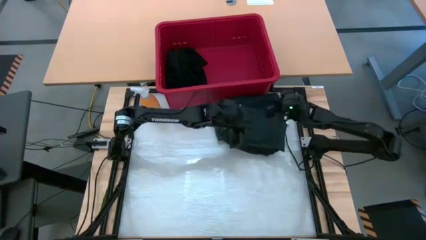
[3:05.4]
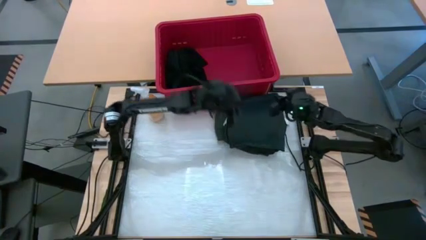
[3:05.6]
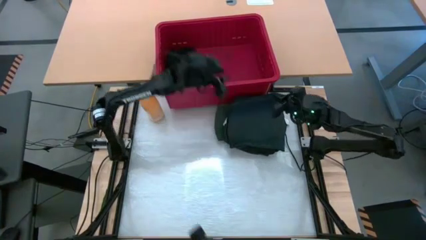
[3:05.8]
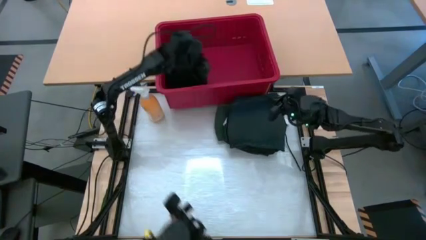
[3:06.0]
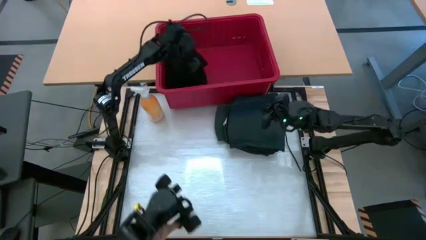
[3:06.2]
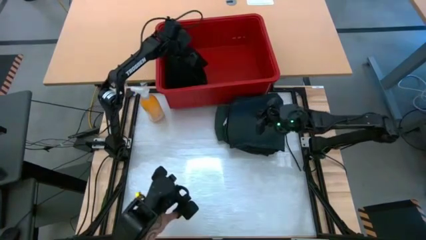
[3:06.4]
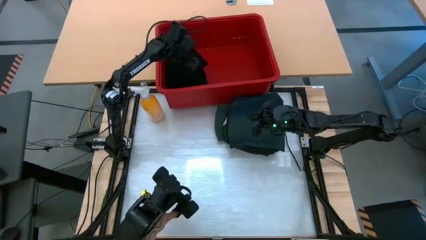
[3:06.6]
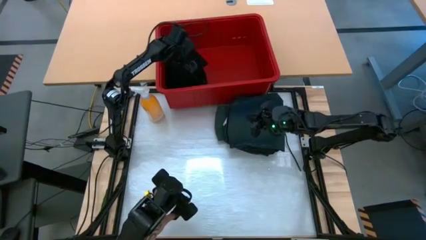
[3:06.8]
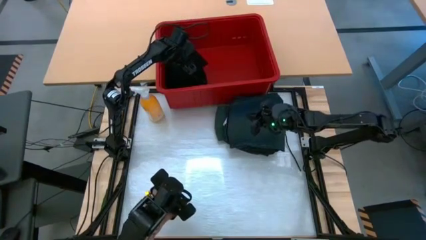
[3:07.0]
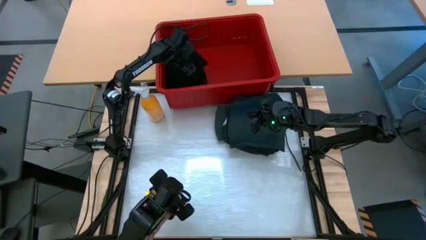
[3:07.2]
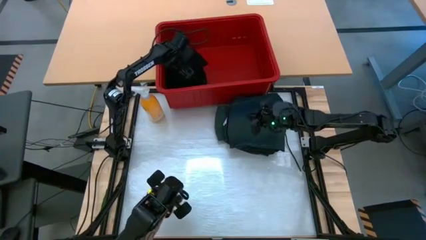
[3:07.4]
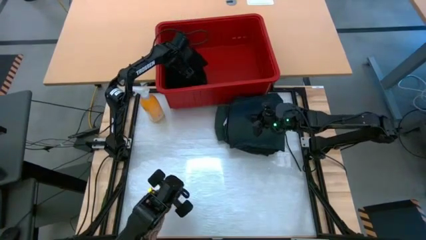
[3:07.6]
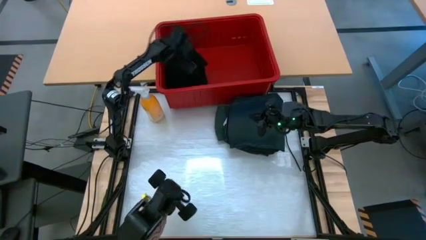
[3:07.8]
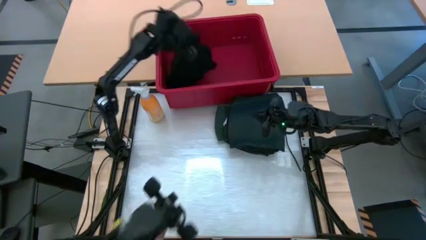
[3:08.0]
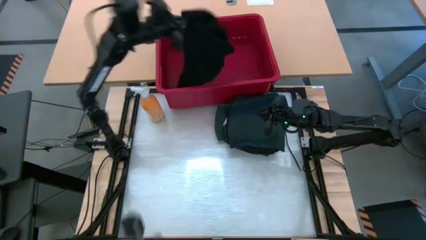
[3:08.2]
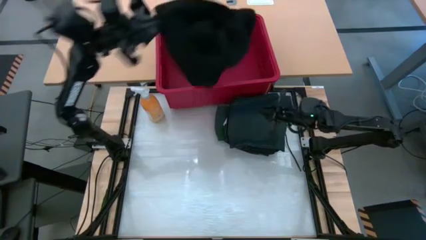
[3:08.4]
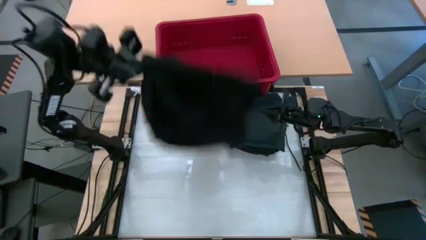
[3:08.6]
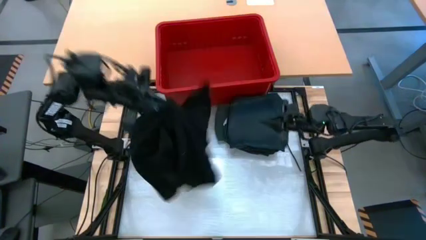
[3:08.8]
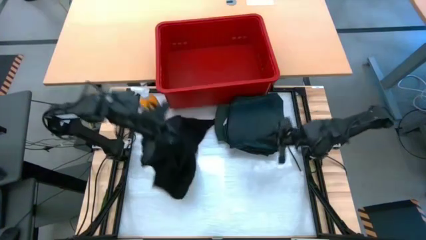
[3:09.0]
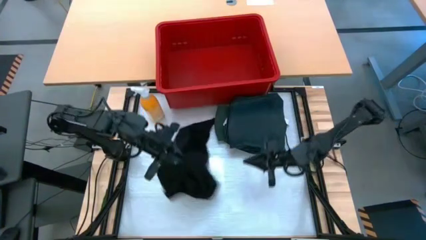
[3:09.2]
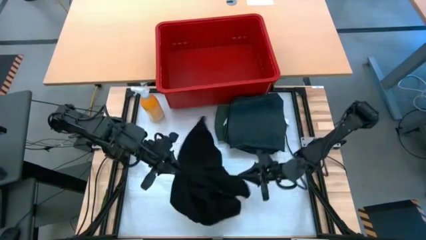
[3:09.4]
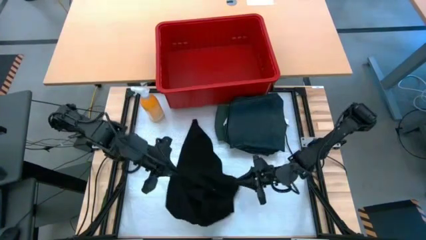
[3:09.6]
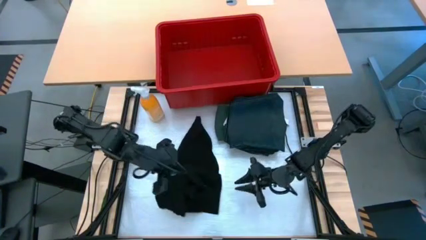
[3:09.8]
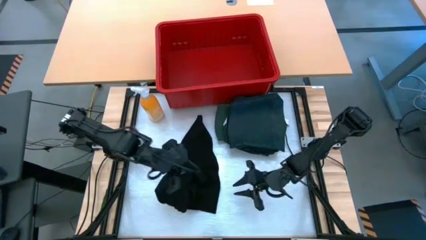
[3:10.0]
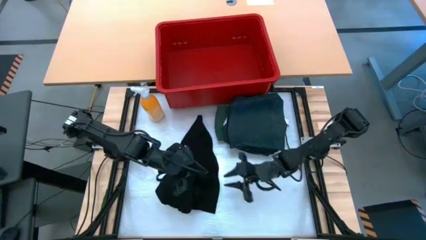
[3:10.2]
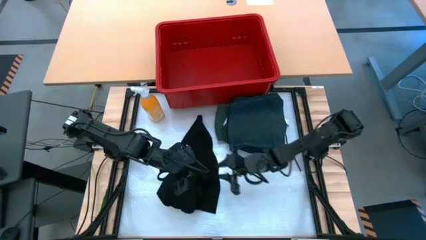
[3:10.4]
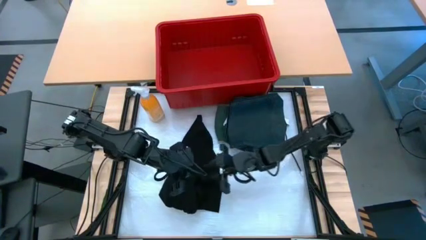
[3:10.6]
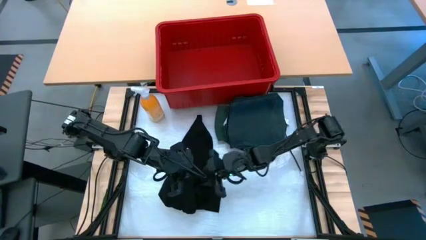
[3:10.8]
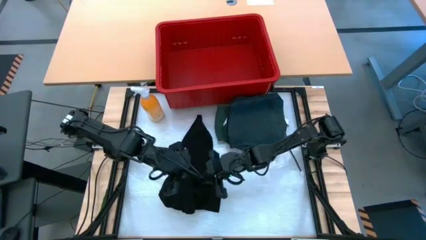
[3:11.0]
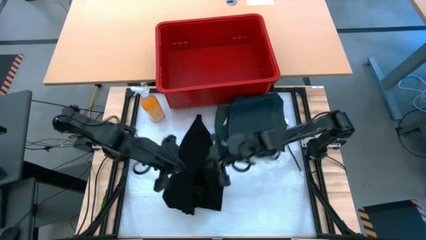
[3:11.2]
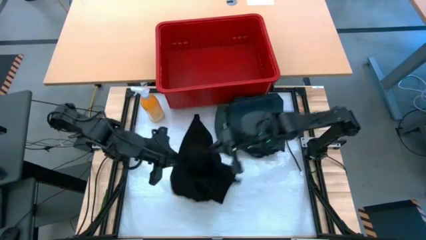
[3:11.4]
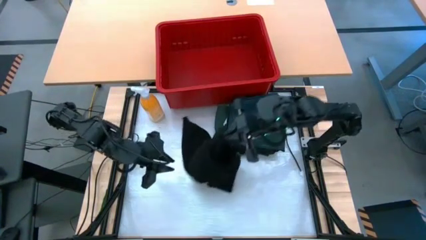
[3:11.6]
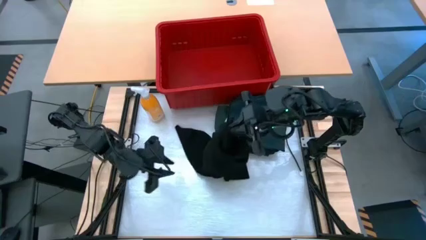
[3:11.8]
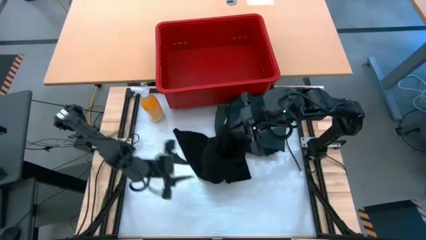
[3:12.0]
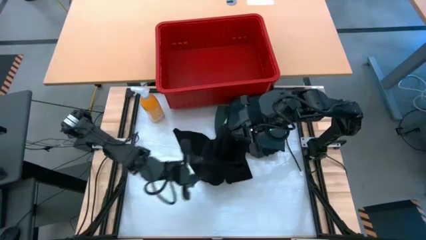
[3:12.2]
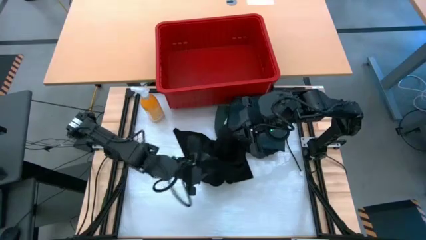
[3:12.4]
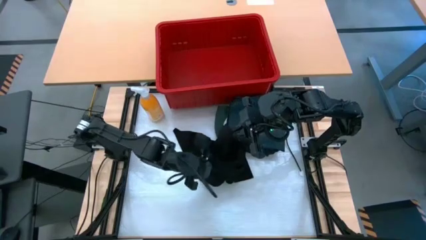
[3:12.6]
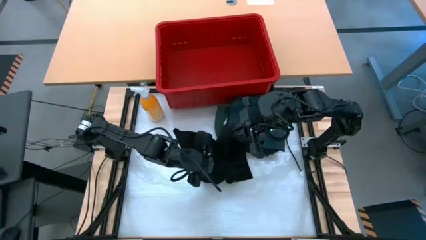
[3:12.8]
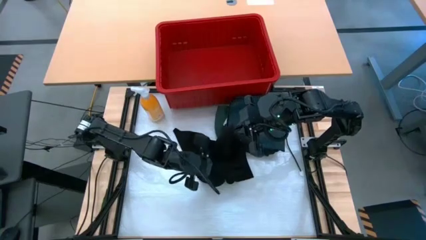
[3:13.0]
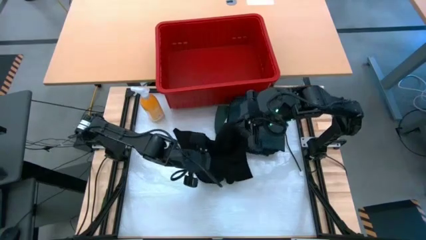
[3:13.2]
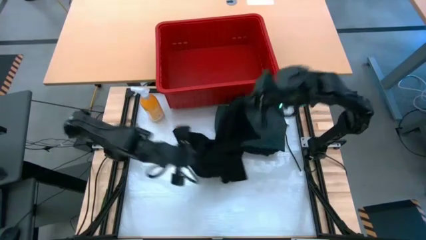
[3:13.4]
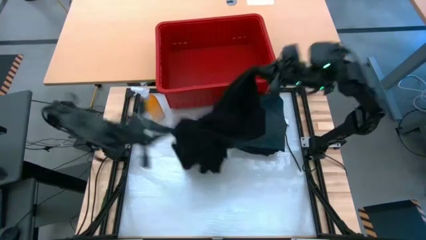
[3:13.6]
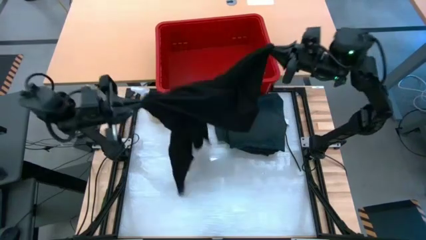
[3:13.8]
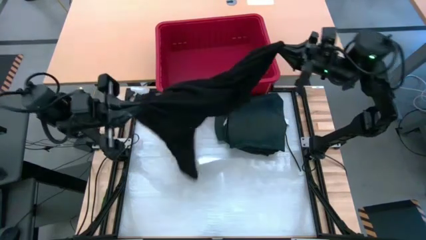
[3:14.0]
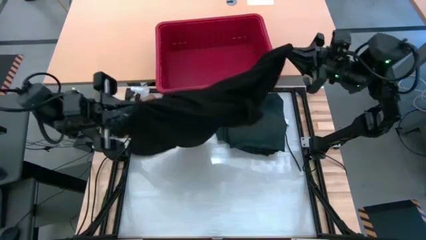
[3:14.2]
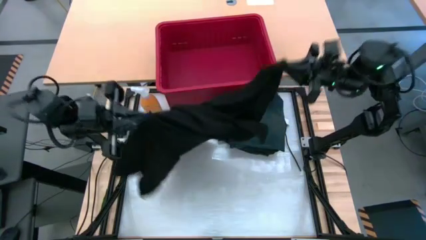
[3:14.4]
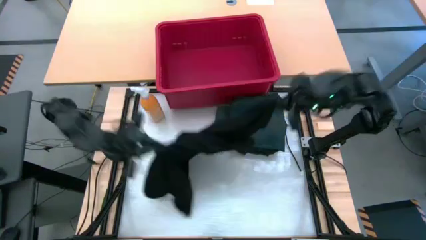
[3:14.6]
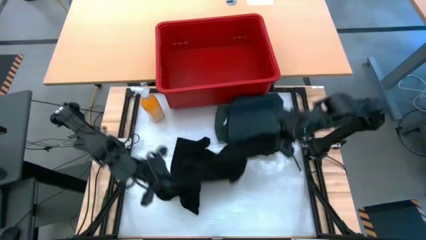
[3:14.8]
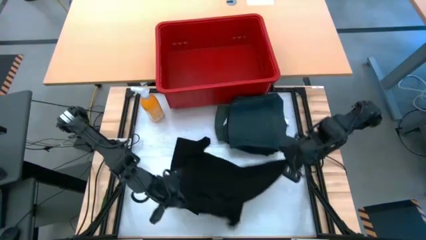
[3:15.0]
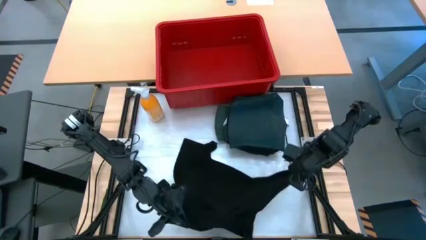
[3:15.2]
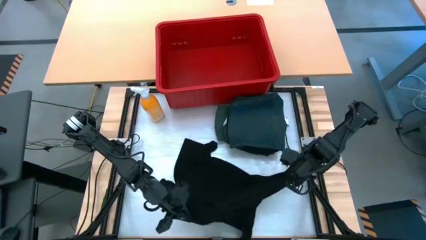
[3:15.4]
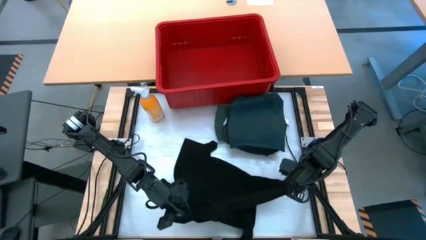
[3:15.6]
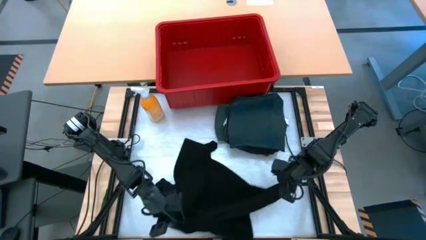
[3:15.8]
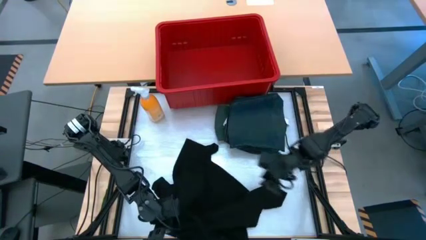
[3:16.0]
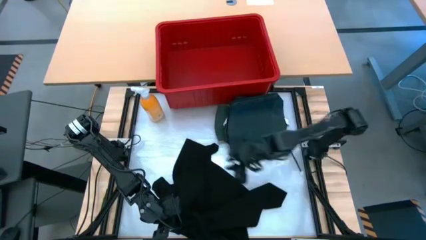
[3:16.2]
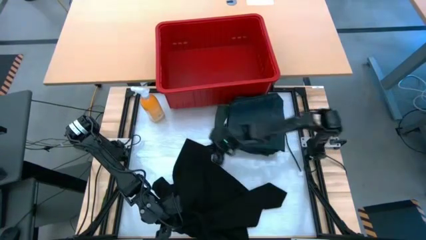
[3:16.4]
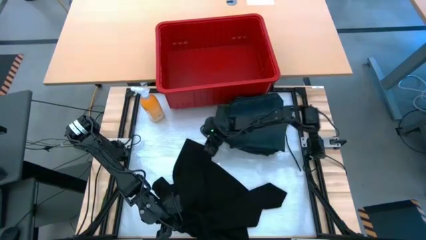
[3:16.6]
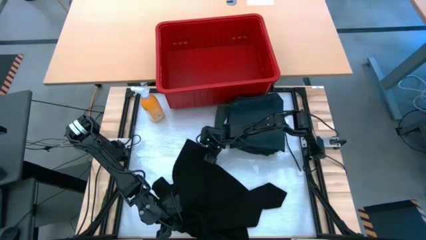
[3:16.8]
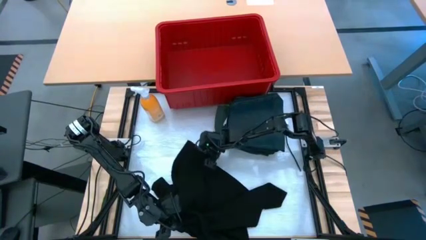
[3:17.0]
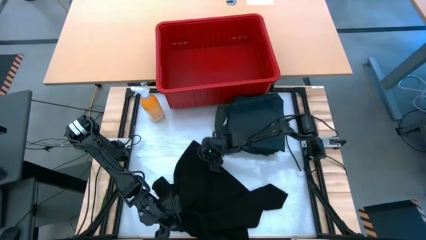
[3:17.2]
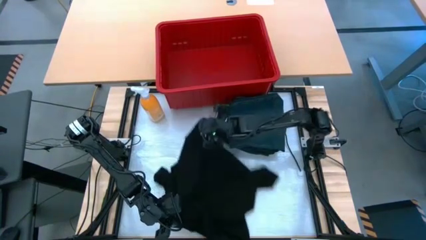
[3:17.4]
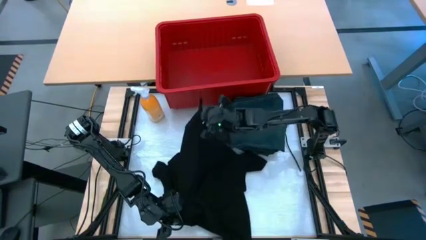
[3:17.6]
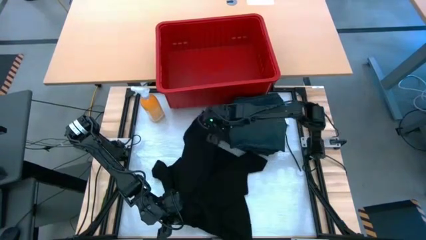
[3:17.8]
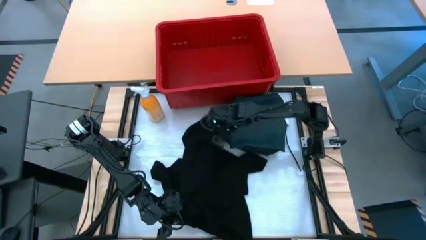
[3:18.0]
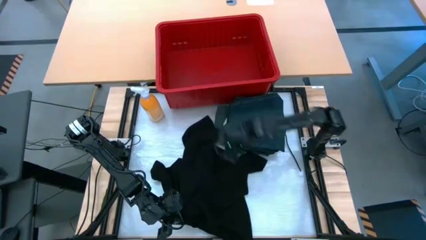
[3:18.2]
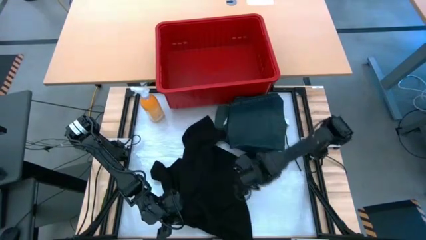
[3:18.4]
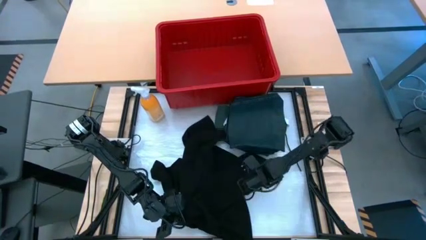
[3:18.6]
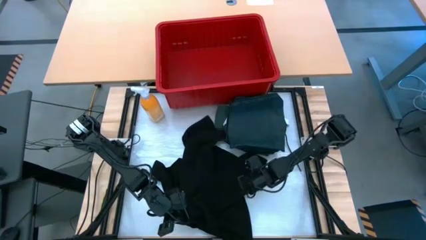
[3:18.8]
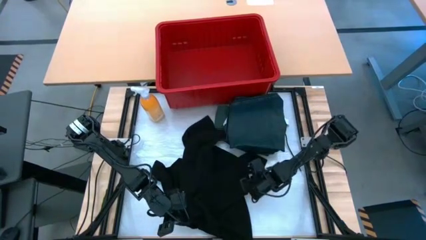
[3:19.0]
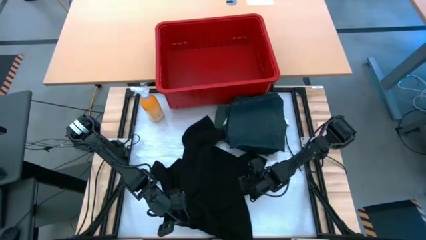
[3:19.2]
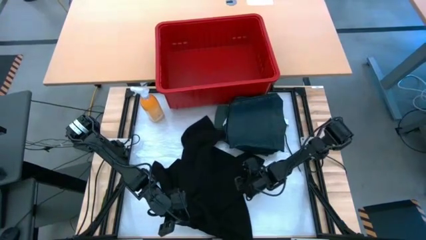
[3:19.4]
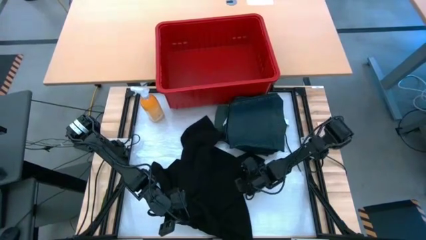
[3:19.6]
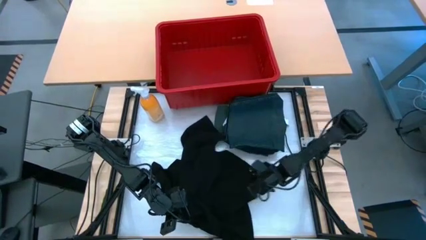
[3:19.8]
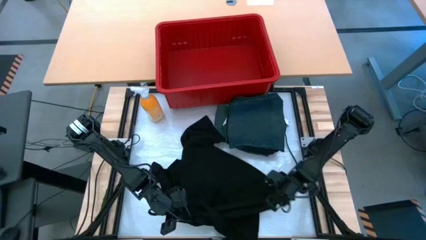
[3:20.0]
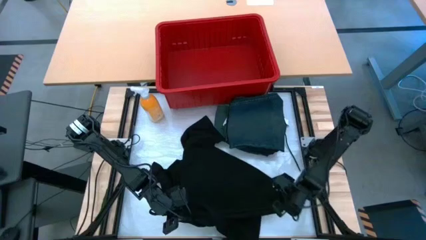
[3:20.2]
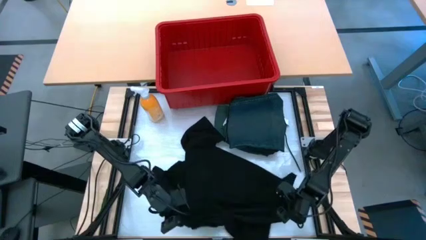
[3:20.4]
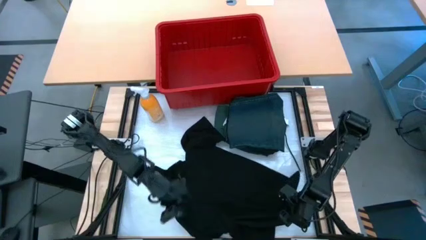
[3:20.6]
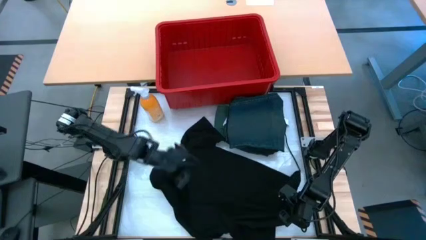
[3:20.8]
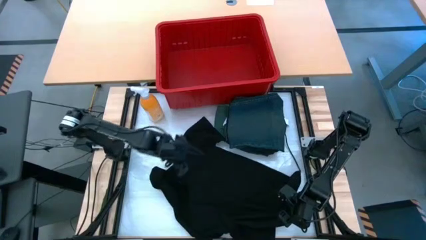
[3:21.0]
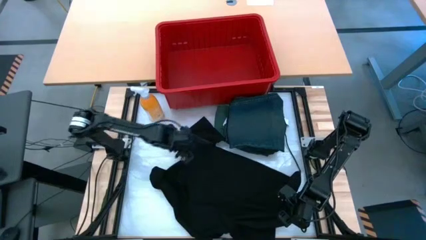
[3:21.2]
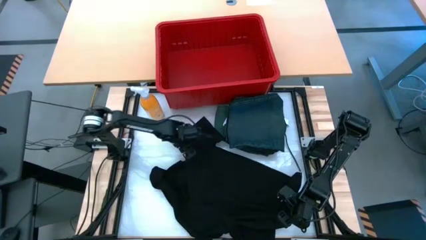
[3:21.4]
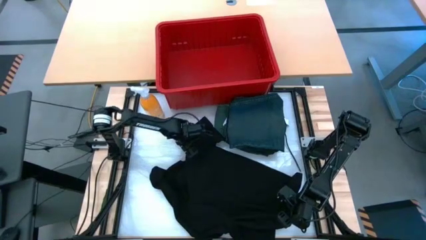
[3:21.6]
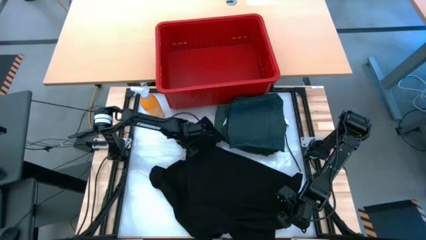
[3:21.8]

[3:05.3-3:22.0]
Task: Fold Laundry from Bin
Fold the black shirt from the red laundry bin
